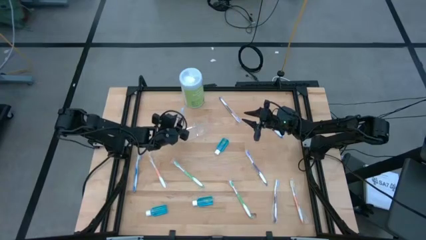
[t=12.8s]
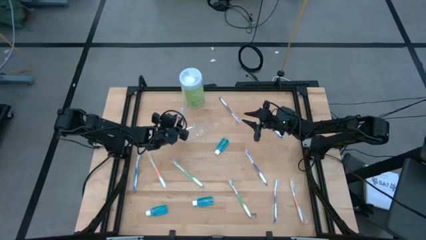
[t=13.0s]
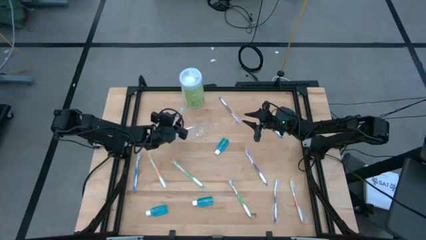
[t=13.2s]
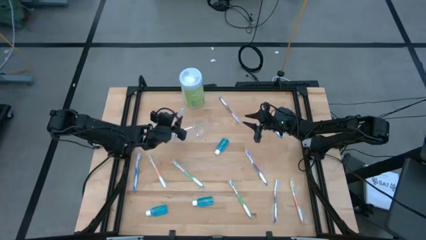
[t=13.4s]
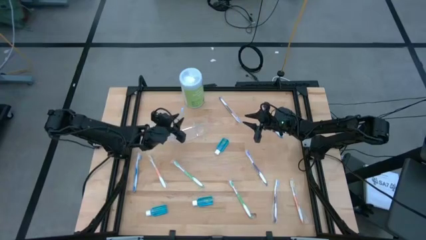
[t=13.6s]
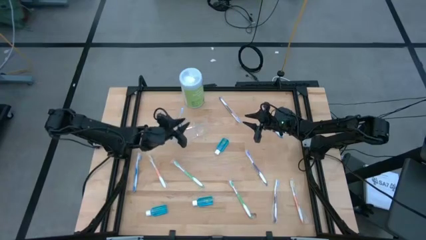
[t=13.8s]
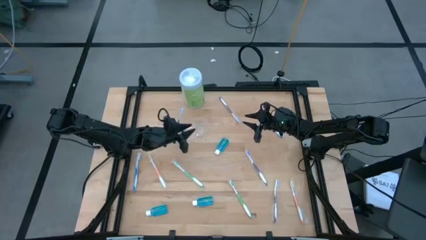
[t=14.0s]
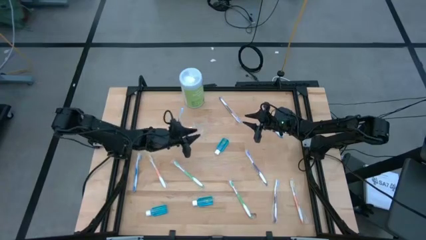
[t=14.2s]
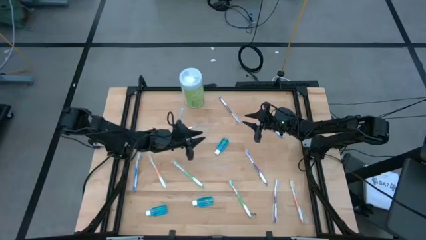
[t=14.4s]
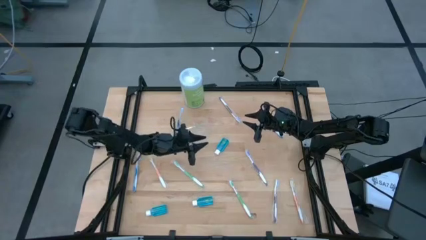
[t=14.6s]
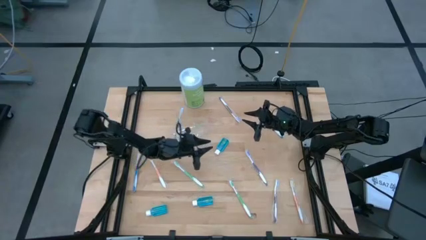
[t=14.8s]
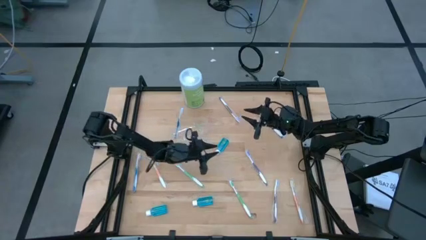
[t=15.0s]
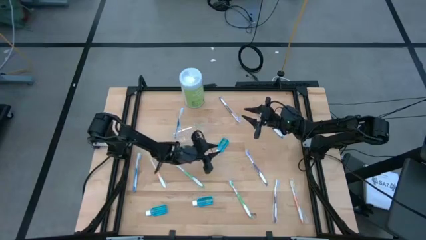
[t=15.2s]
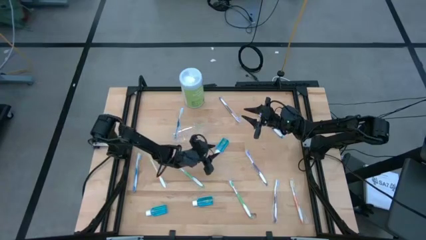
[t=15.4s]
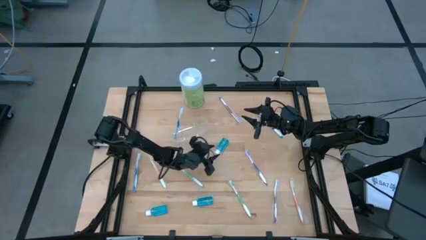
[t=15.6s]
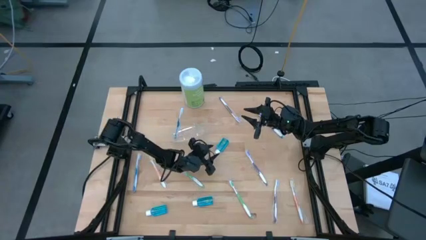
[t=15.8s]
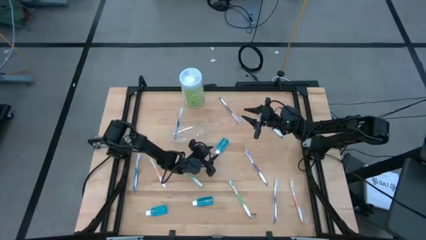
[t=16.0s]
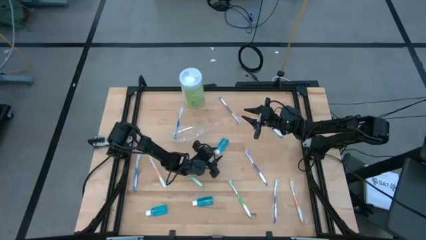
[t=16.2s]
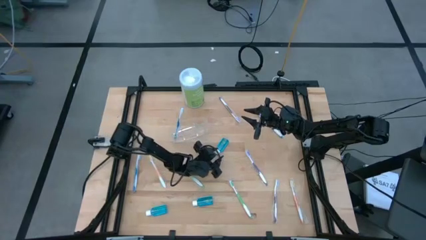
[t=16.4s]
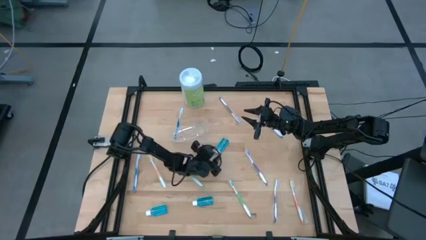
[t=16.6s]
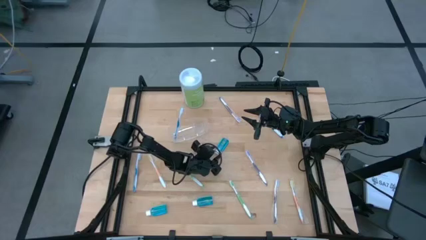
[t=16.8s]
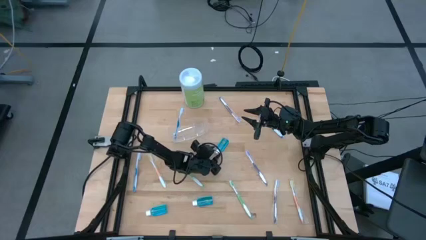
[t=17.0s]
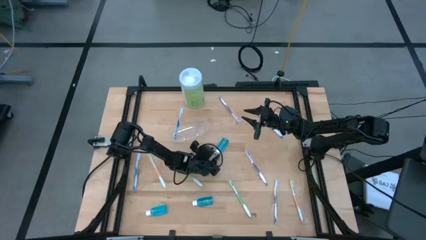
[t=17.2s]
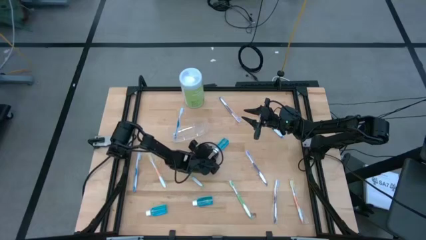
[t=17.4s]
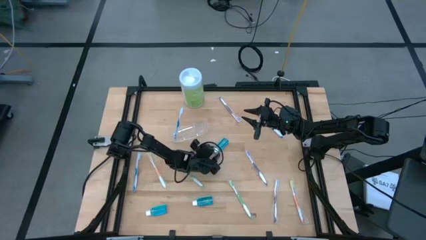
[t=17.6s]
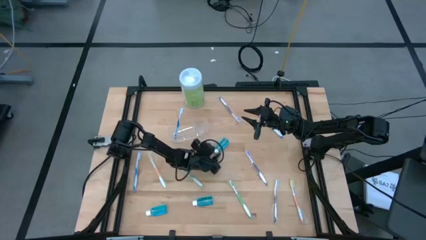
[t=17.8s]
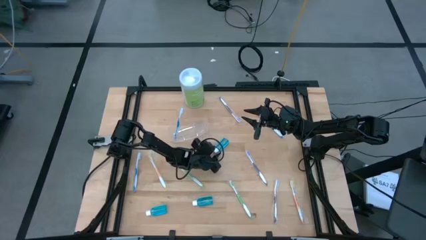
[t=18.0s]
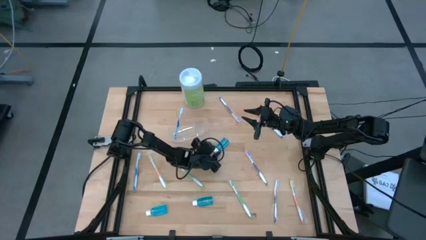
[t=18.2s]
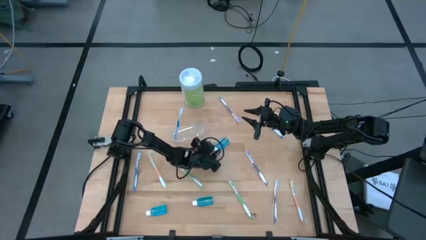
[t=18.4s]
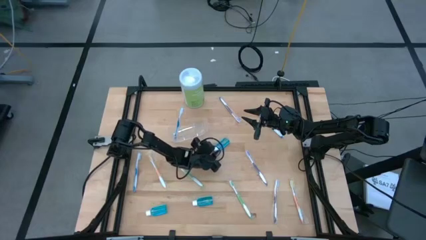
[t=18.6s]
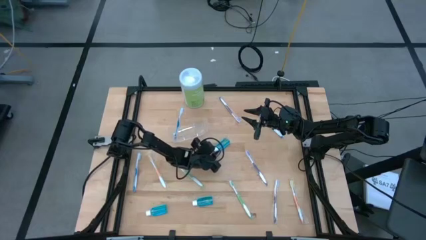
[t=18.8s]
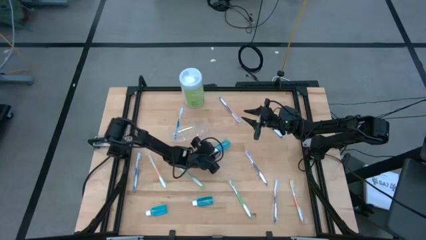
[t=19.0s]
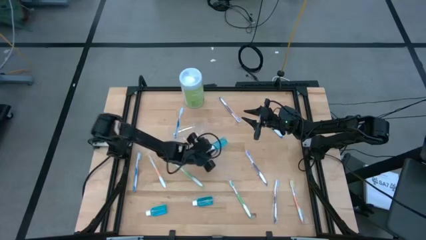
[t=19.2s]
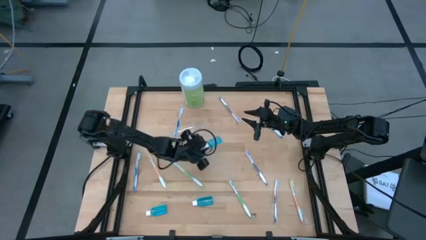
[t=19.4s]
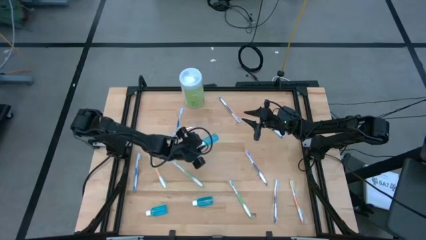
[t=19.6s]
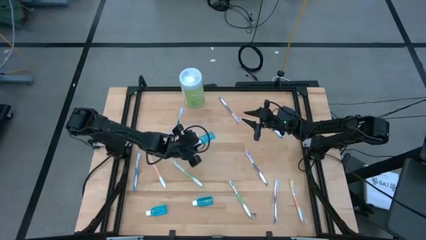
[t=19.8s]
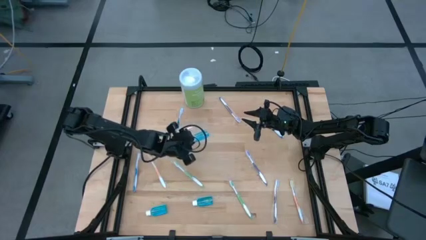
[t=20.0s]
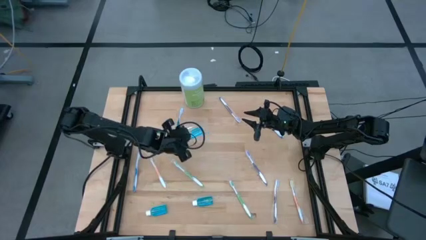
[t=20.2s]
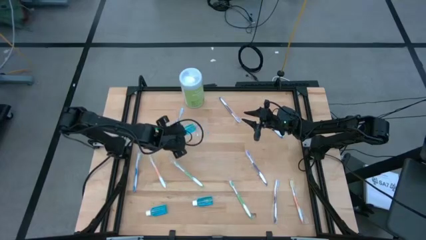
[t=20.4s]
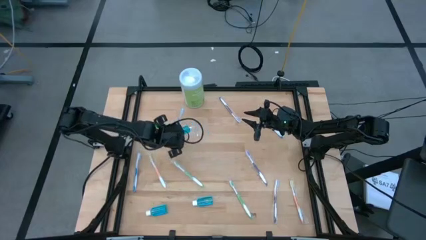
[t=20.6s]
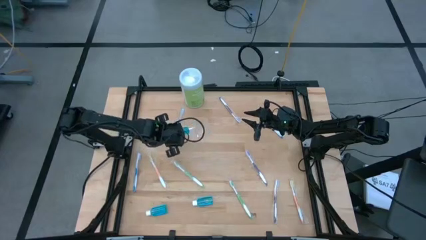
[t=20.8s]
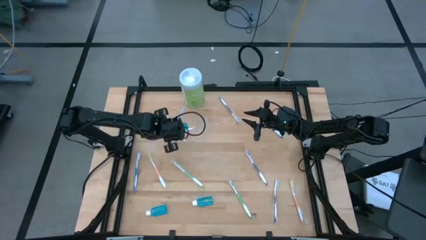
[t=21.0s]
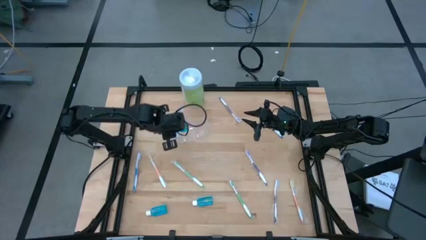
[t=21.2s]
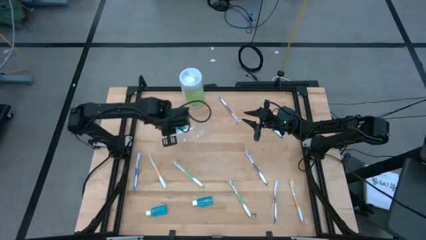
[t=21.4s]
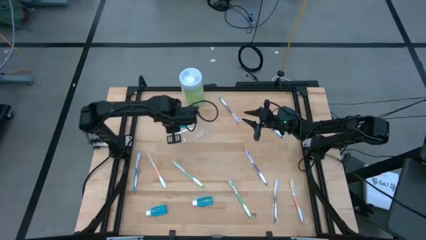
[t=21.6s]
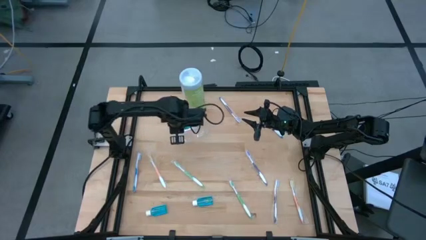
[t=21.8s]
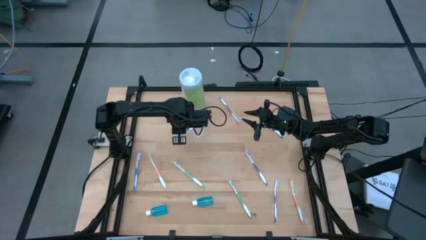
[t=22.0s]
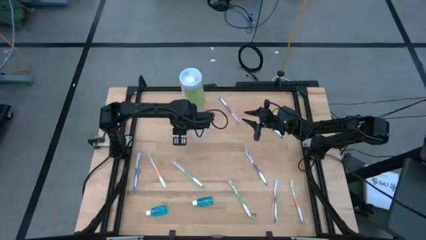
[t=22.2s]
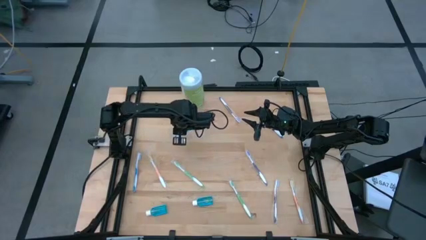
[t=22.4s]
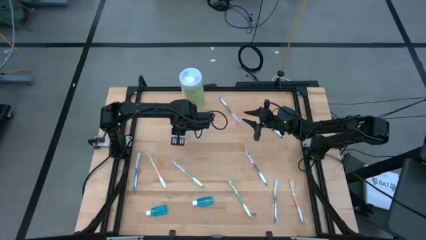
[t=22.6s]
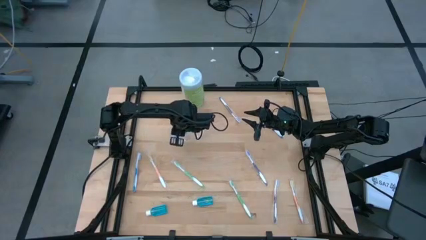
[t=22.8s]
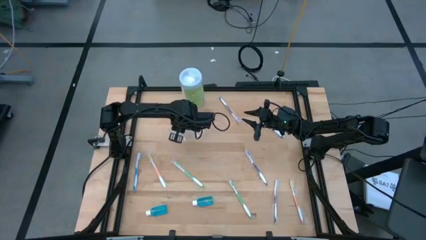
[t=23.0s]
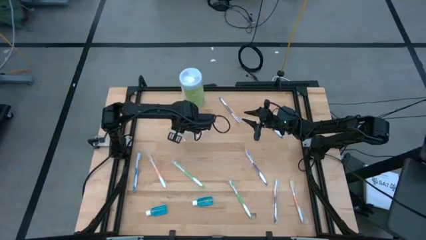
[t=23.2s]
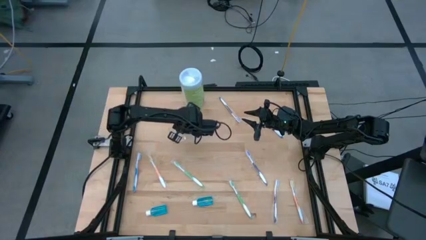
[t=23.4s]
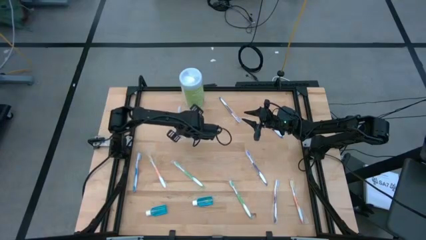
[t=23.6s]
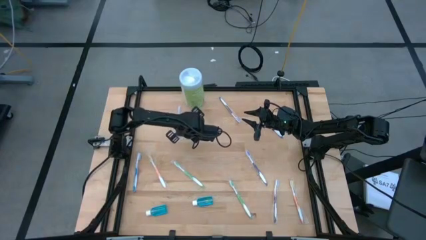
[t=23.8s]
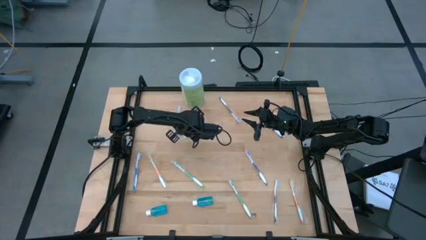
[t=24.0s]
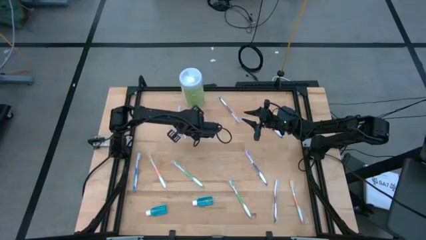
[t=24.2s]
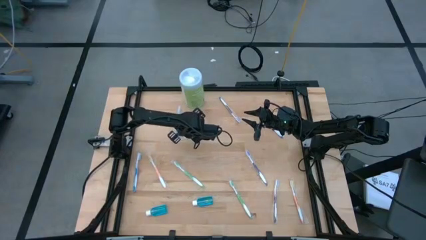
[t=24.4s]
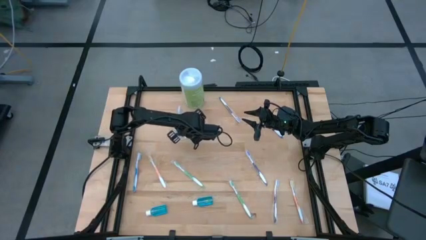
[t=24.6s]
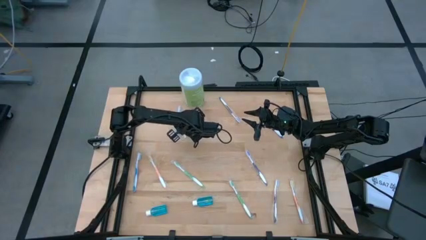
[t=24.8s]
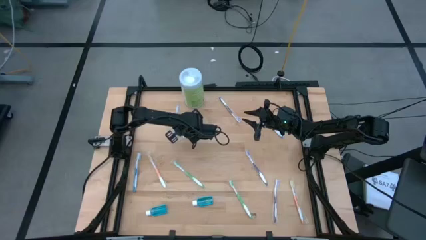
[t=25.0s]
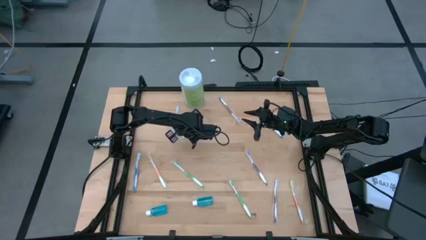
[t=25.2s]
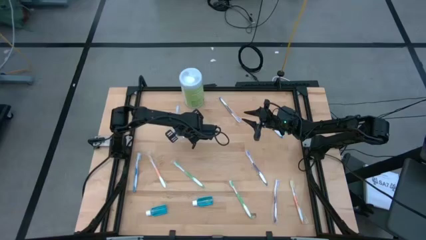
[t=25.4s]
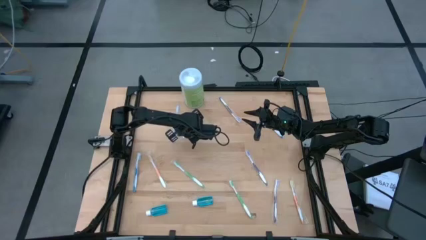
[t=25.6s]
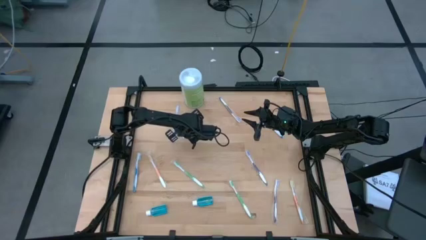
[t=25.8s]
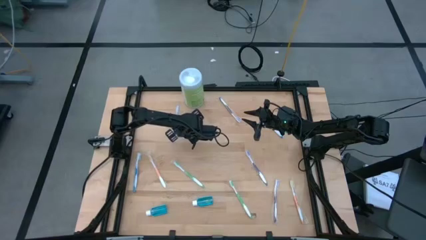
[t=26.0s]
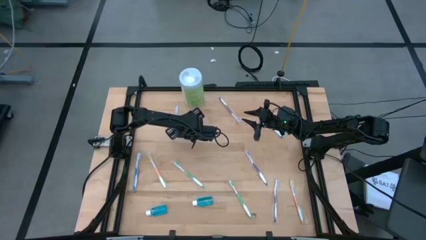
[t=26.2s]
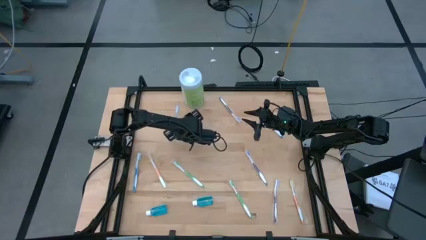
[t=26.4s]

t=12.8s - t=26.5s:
Task: Pick & Place toothbrushing station
Put the top mouthwash into the transparent organizer

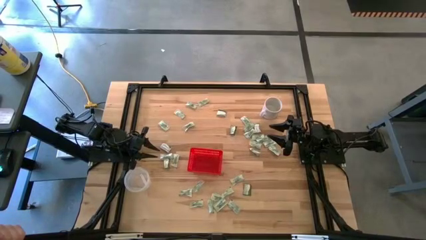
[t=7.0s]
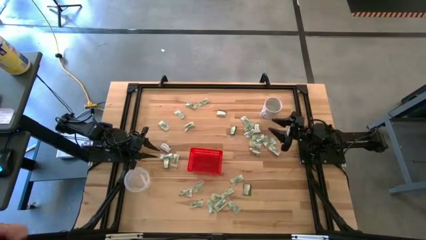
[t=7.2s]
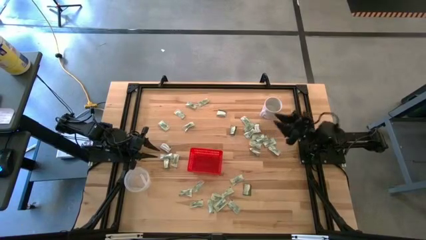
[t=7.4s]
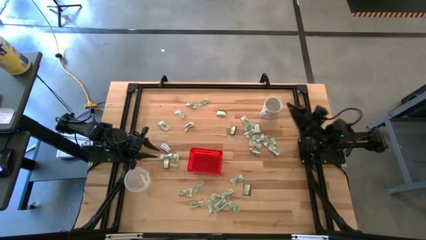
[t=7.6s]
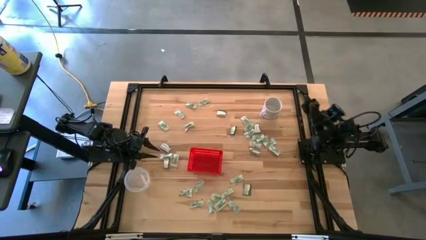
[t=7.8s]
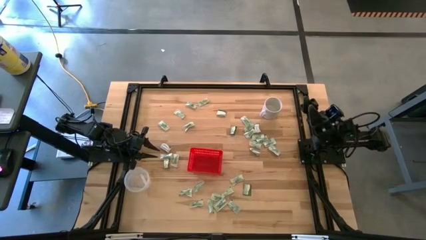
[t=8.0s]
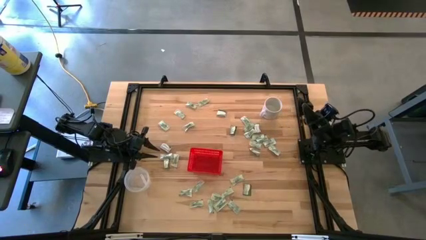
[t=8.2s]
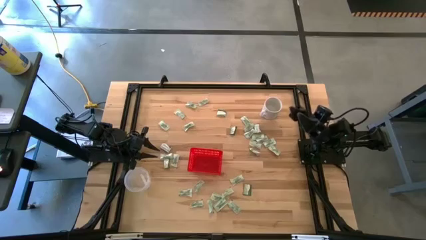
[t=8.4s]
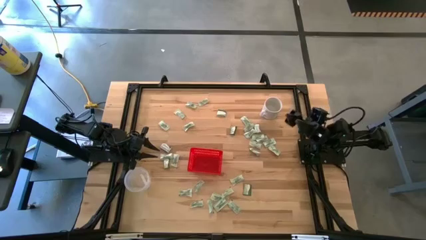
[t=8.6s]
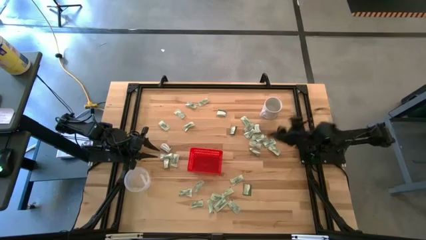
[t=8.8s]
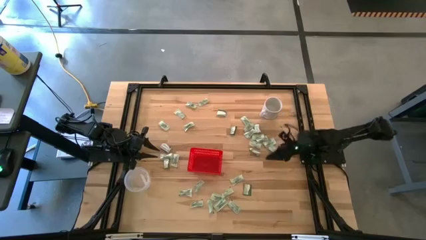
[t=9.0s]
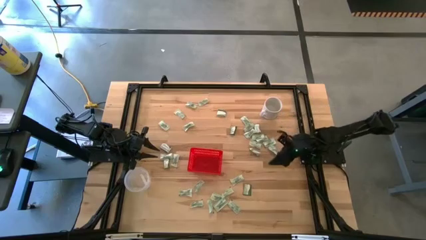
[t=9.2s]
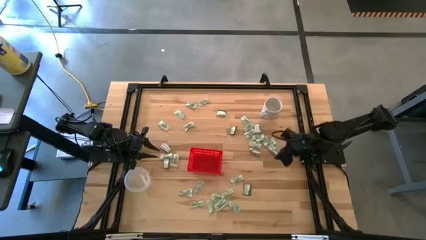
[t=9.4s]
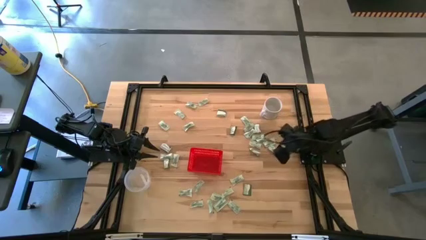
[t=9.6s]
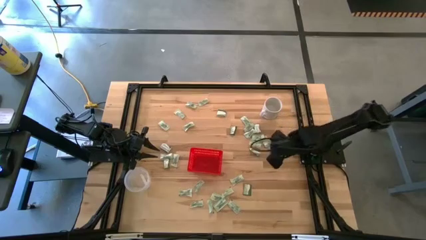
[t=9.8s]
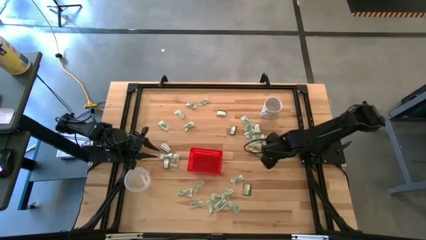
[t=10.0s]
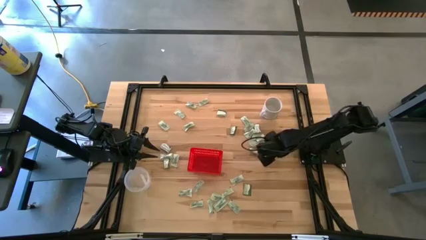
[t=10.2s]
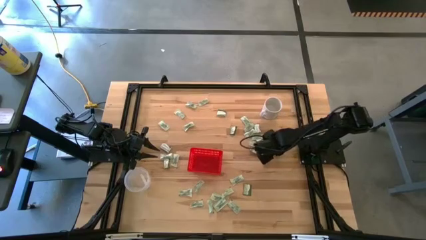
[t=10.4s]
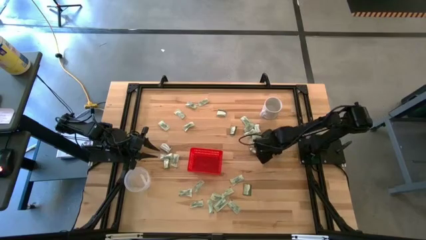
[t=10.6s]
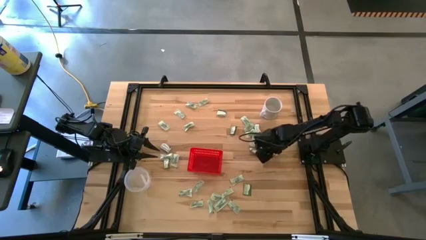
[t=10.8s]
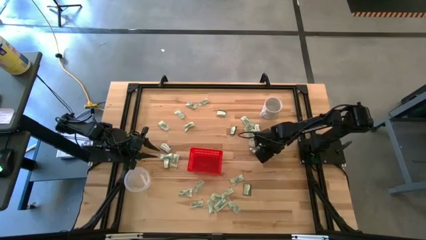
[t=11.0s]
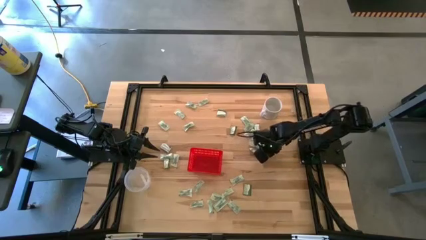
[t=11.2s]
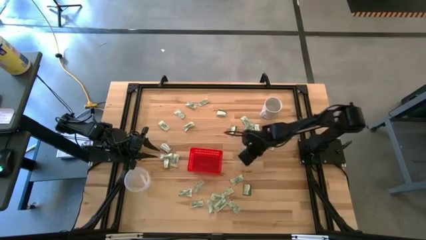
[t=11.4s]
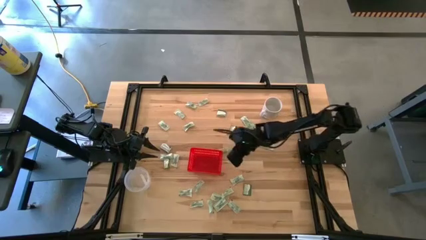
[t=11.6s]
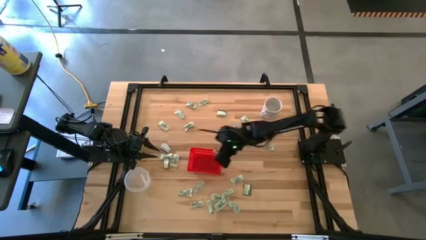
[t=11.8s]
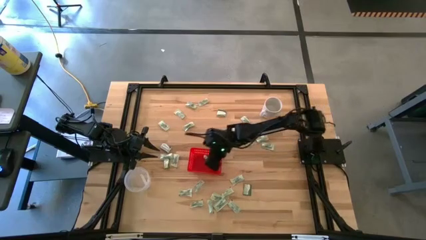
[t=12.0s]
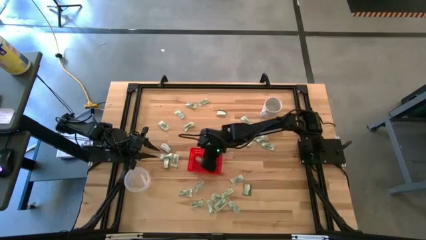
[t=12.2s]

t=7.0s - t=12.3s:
Task: Pick and place Stevia / Truvia into bins
Put the green stevia packet into the red basket
